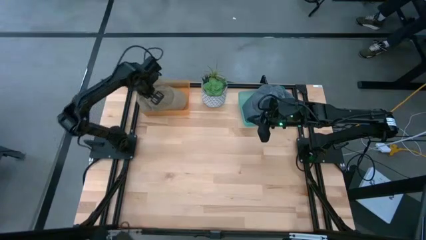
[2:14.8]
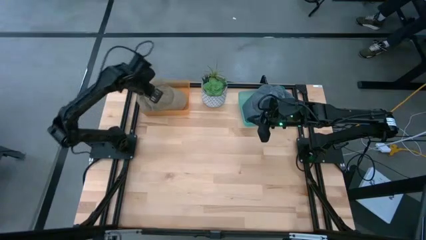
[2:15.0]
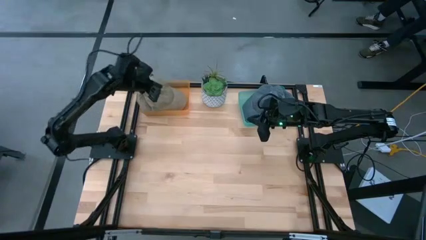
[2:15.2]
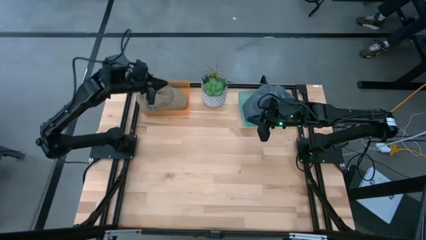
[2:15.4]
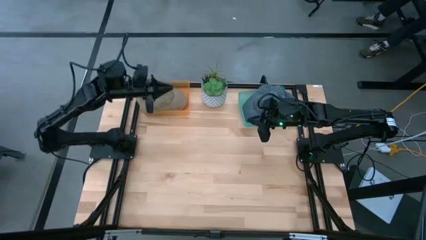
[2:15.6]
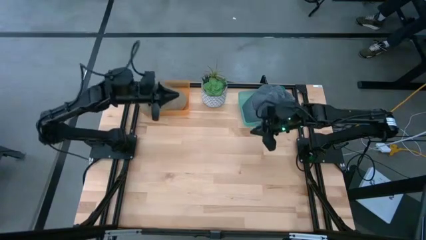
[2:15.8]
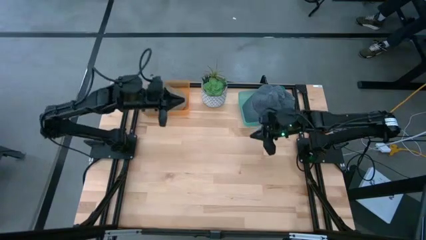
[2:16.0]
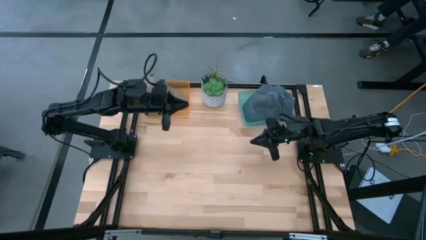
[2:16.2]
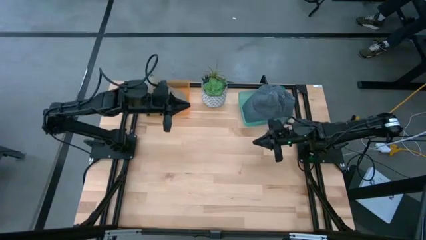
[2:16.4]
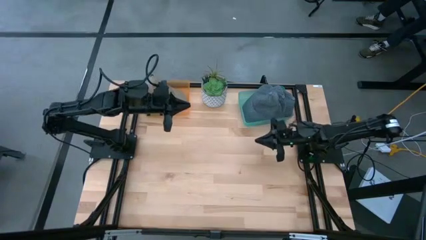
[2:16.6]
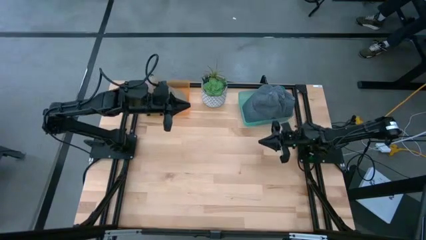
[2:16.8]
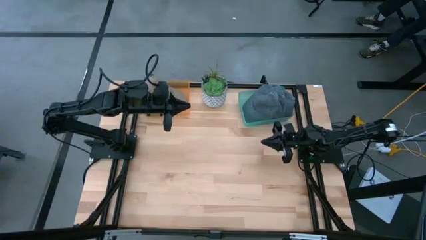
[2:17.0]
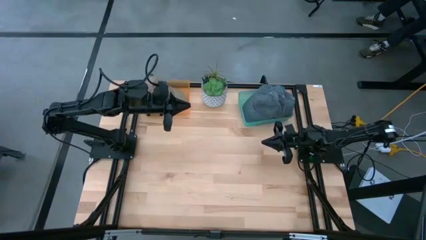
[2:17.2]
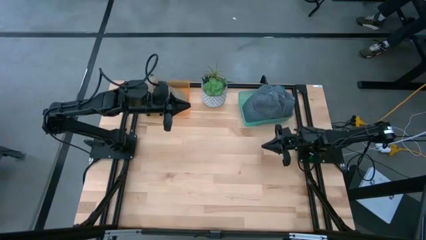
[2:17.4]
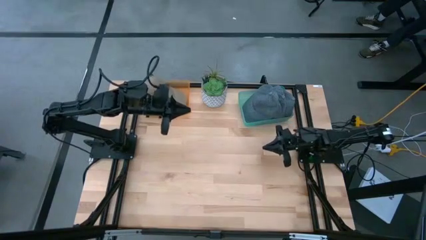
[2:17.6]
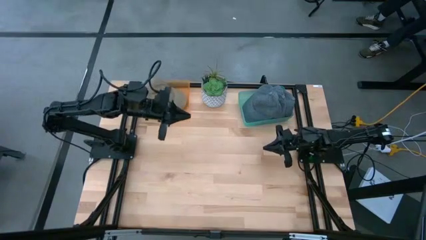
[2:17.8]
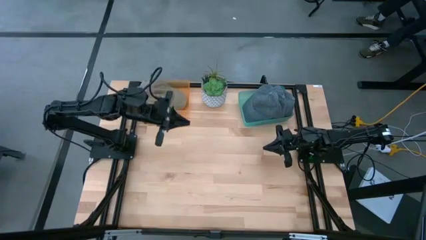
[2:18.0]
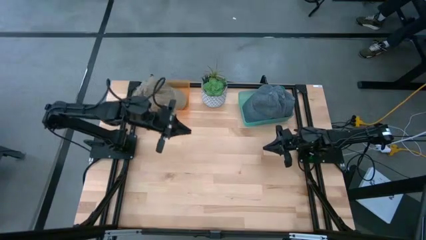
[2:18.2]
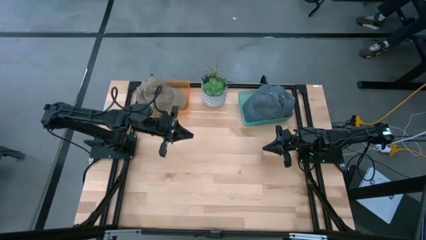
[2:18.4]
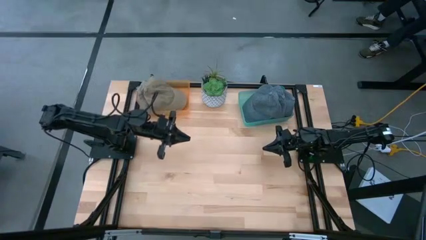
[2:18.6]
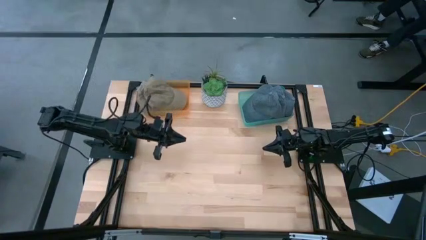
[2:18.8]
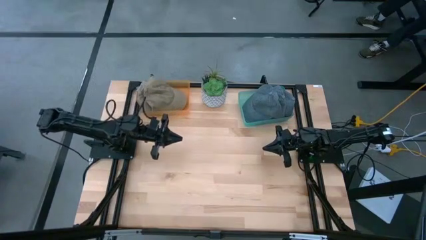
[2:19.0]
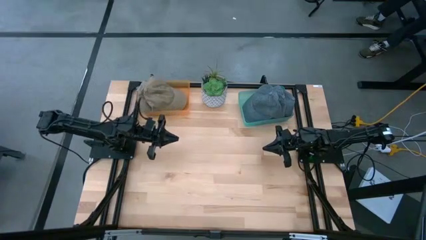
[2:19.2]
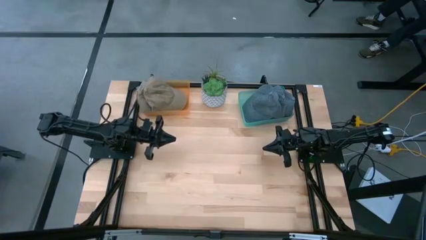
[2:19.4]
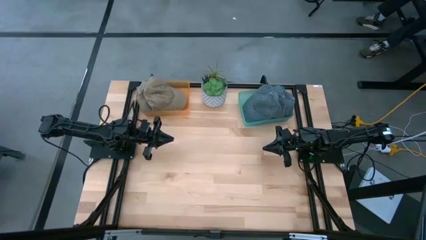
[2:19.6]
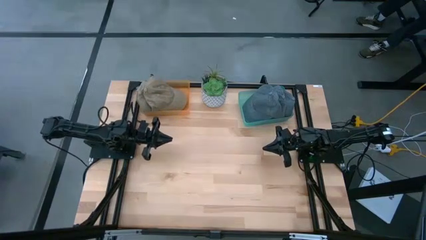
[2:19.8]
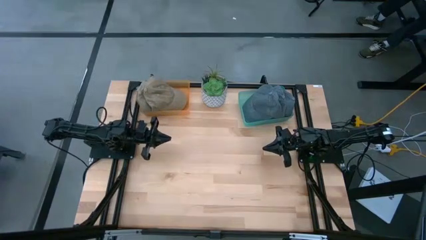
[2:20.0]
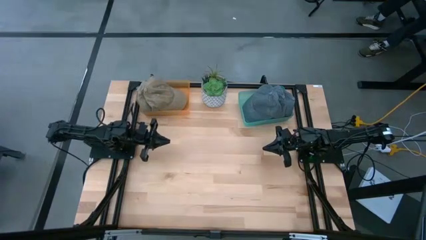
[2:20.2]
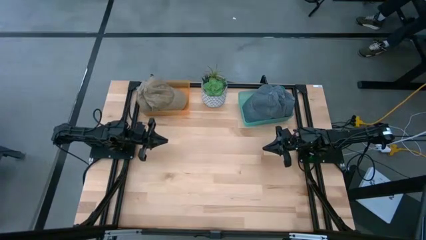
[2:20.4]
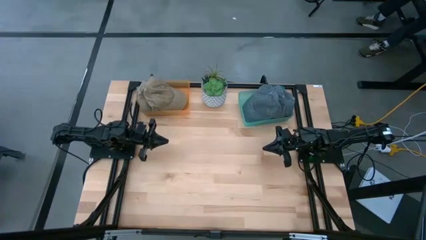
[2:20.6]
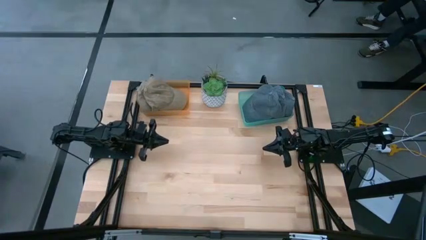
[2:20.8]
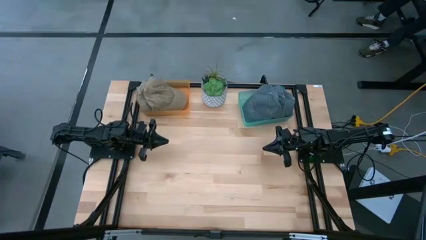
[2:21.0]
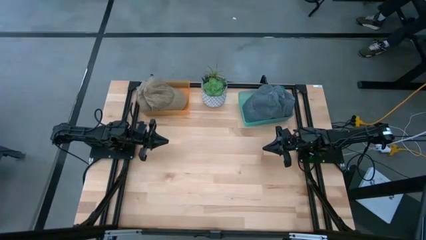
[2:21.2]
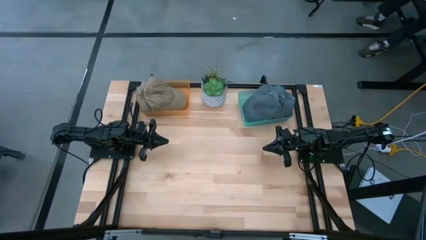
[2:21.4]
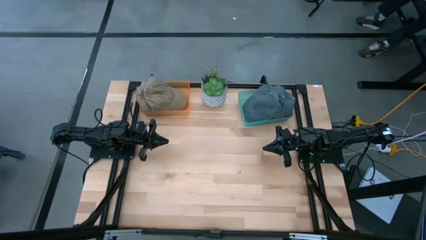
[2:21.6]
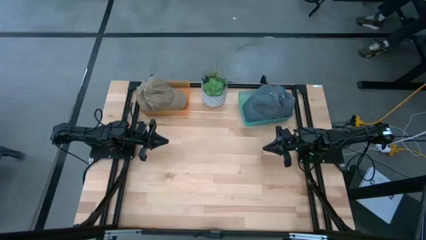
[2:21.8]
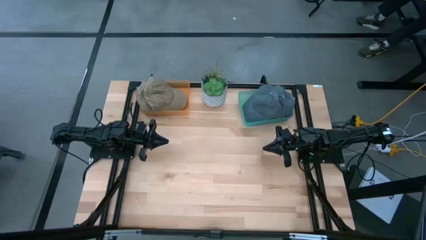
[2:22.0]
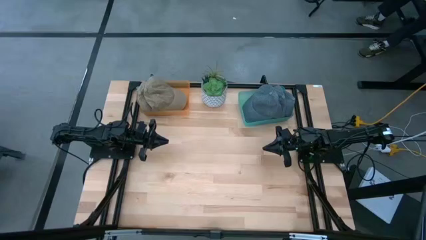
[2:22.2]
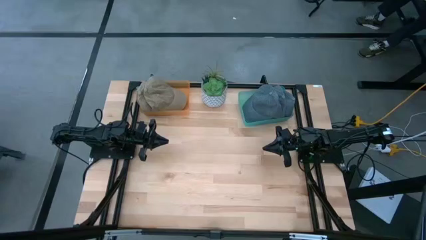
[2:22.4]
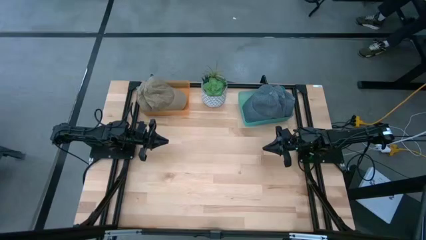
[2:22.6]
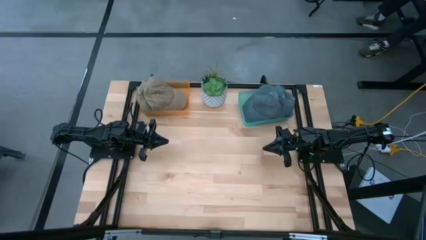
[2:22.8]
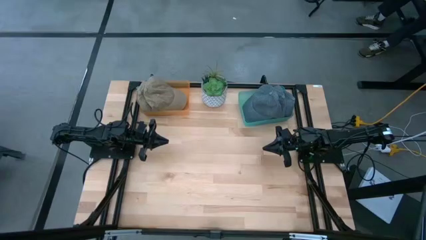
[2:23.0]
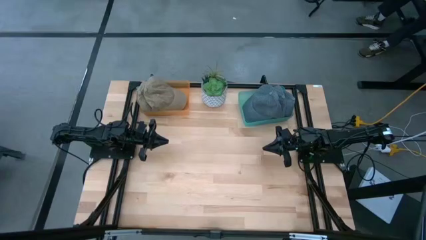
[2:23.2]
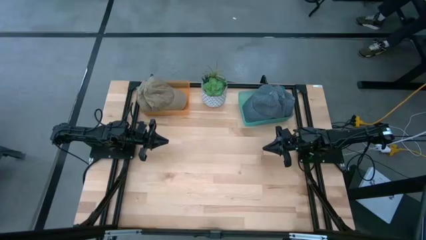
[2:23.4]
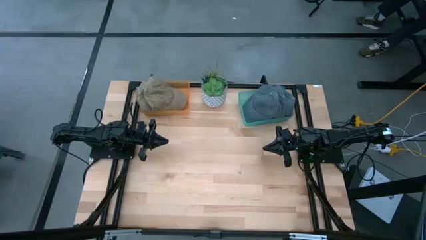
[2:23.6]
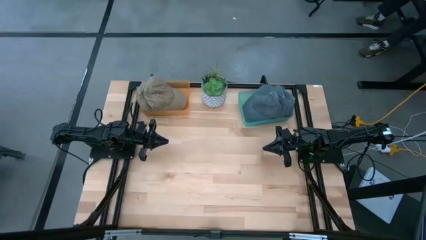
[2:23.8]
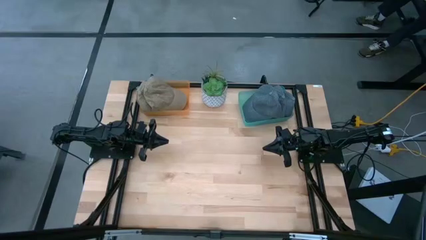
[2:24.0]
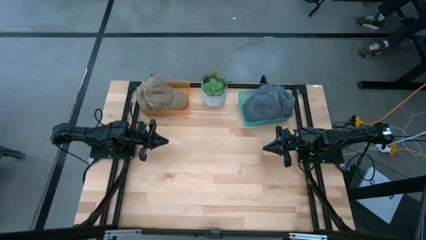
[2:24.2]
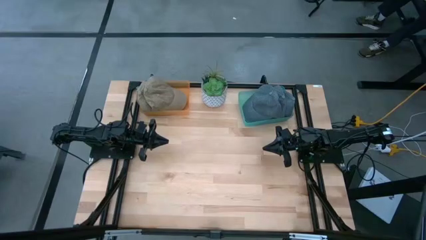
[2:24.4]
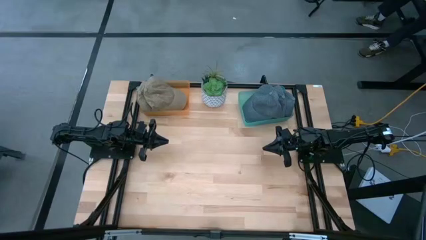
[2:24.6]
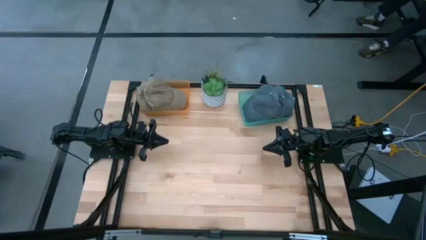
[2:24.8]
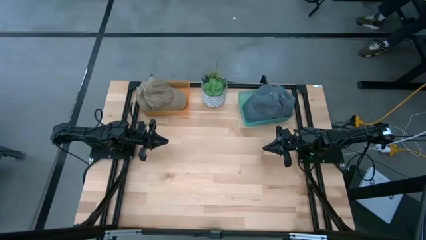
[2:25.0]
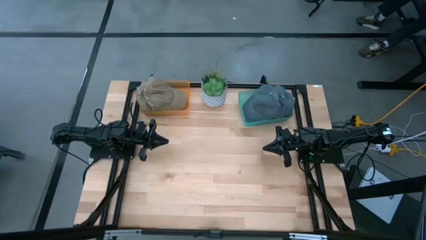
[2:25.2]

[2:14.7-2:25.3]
Task: Pick & Place hat
Return to Home Position

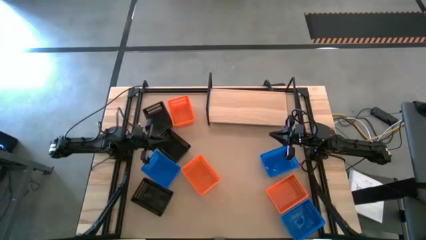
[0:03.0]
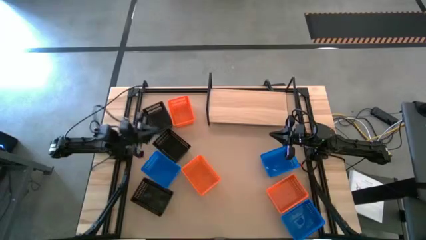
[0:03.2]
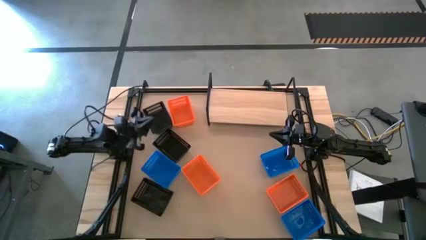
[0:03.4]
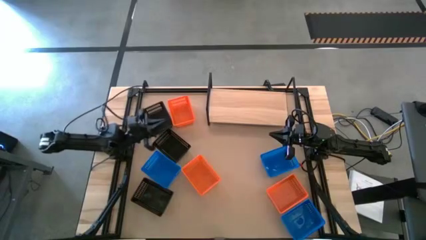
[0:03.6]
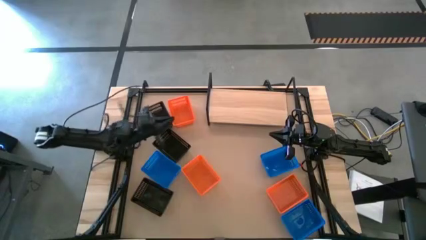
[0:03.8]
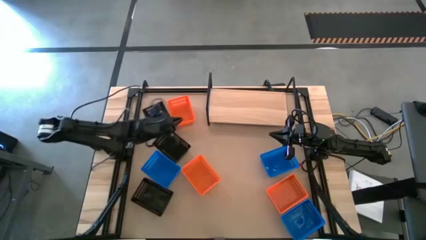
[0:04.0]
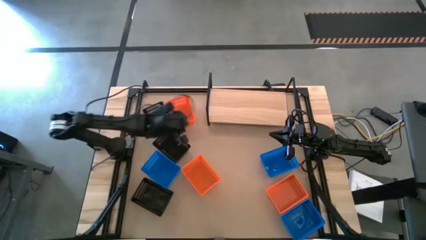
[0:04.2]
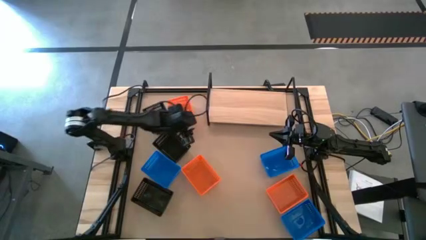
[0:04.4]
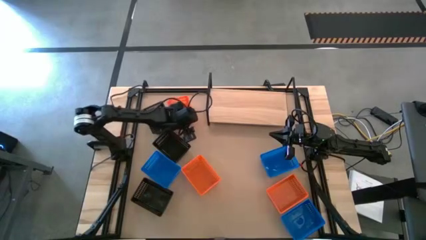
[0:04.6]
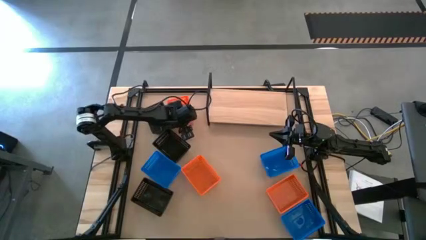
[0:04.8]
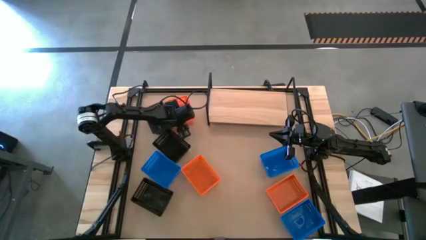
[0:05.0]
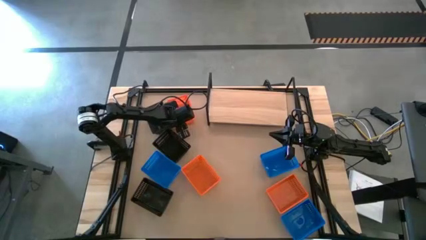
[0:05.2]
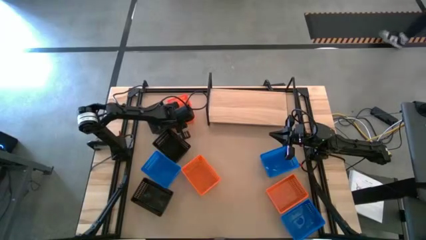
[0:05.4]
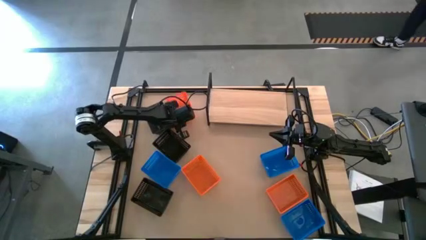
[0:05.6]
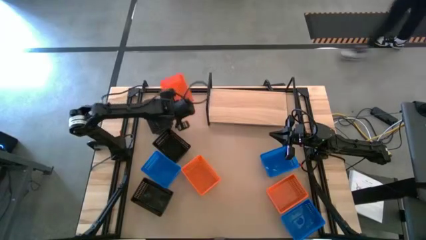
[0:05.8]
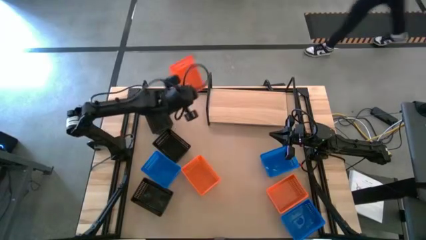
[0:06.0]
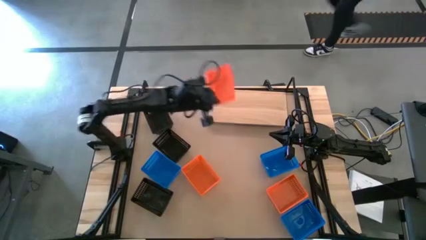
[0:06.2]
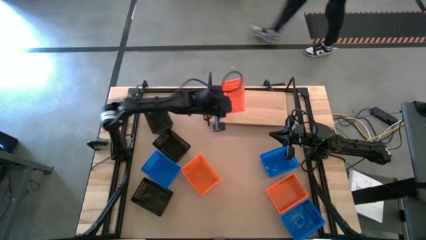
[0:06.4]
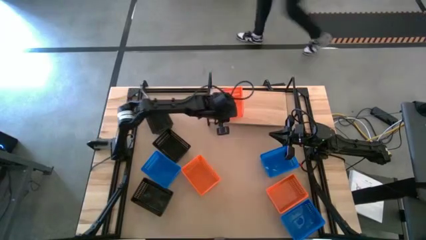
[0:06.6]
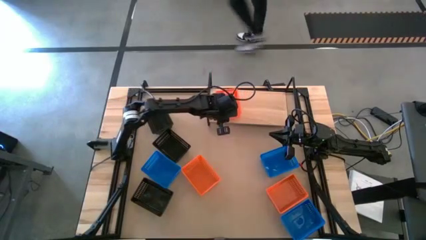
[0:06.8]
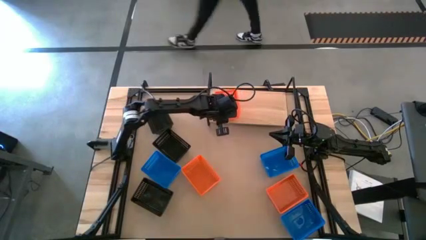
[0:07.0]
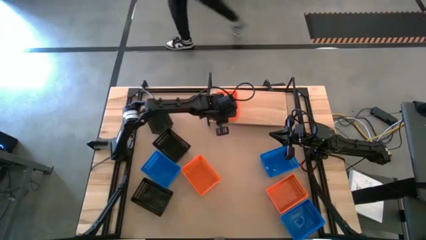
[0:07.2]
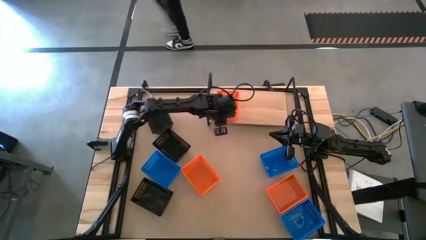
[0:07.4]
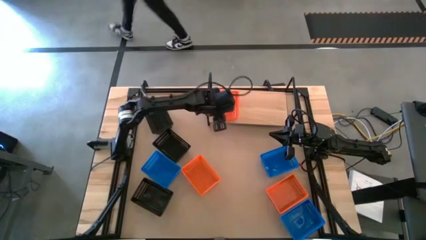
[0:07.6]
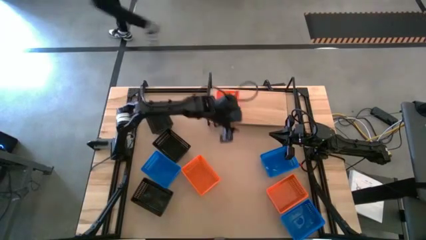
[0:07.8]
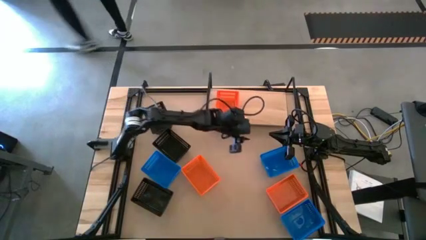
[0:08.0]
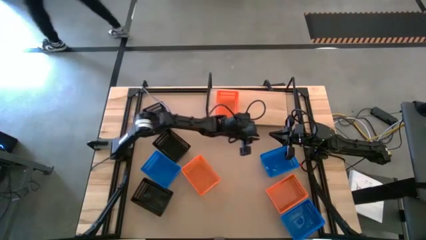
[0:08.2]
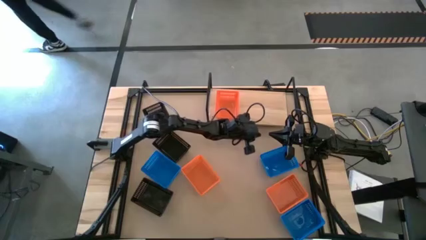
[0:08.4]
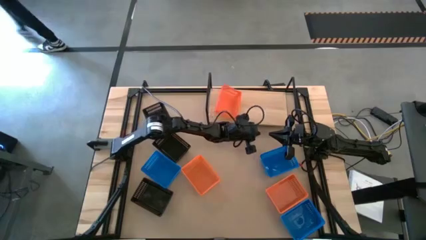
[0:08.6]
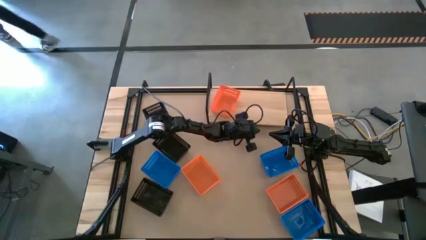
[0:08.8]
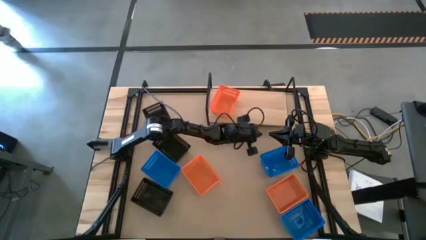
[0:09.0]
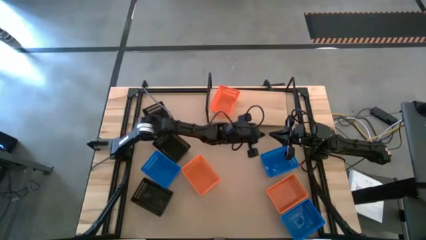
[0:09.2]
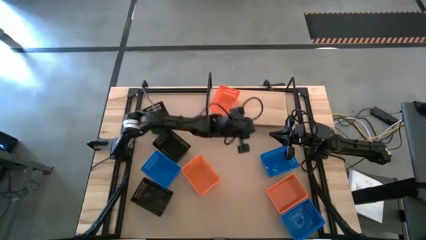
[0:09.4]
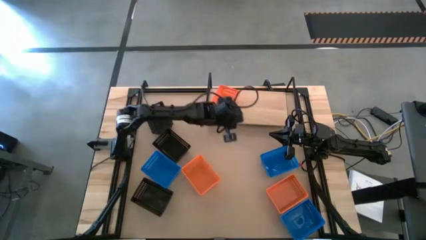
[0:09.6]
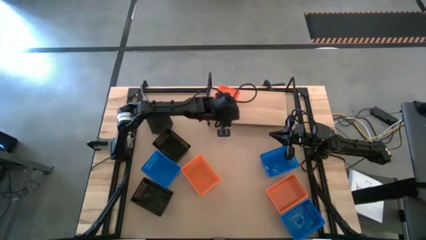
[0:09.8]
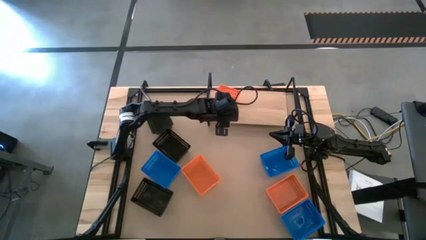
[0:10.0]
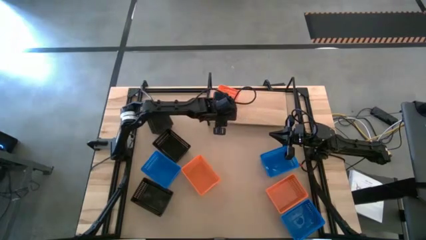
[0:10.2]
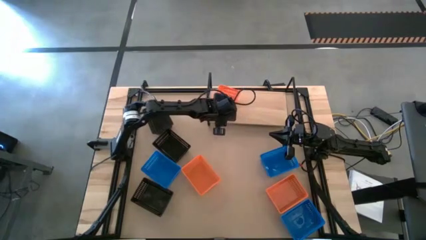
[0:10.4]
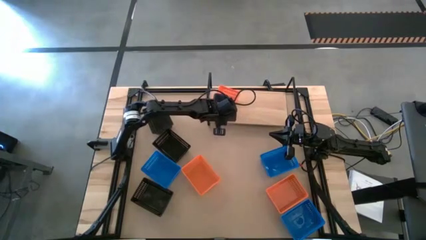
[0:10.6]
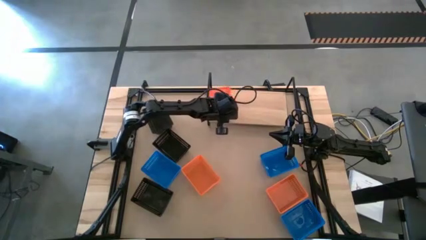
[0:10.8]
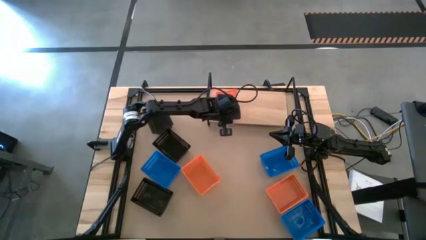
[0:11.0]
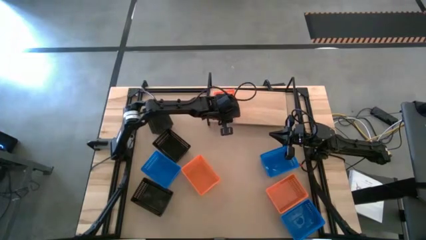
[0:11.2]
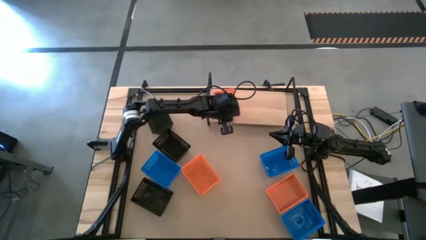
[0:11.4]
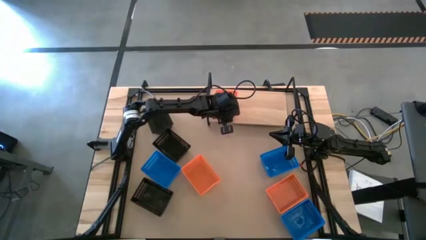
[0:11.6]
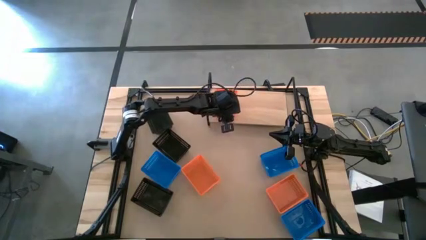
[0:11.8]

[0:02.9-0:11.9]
Task: Stack baskets on shelf by color
Put the top orange basket on the shelf
